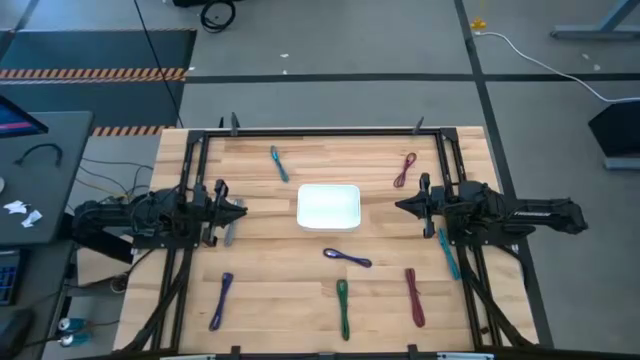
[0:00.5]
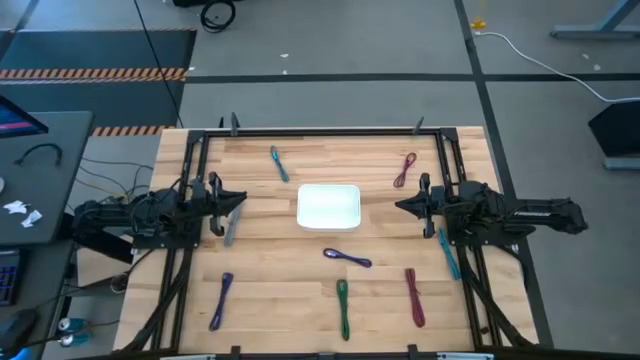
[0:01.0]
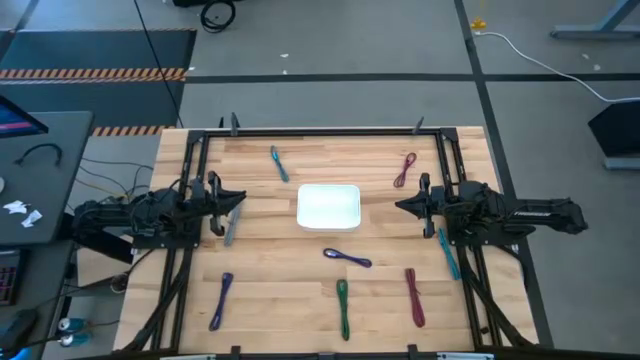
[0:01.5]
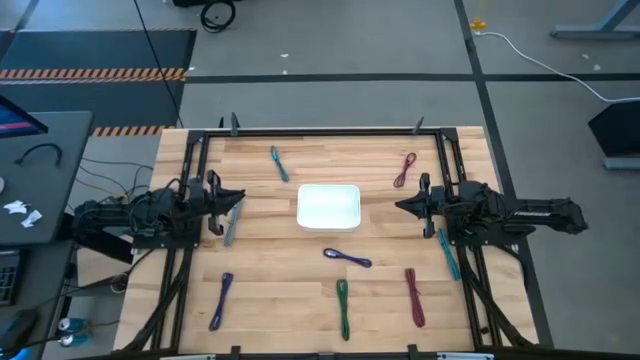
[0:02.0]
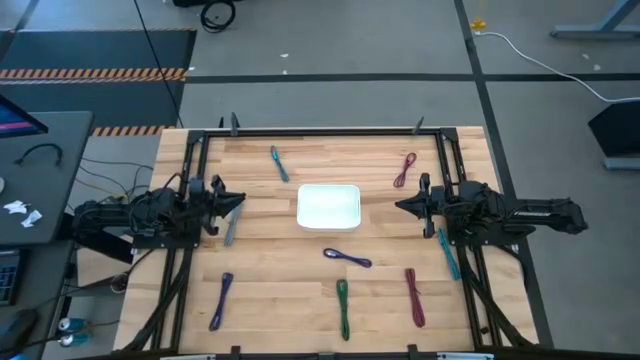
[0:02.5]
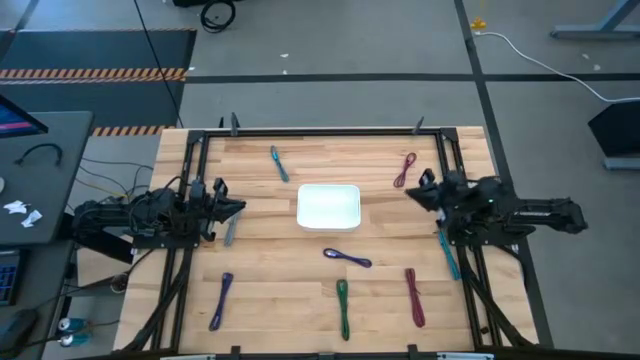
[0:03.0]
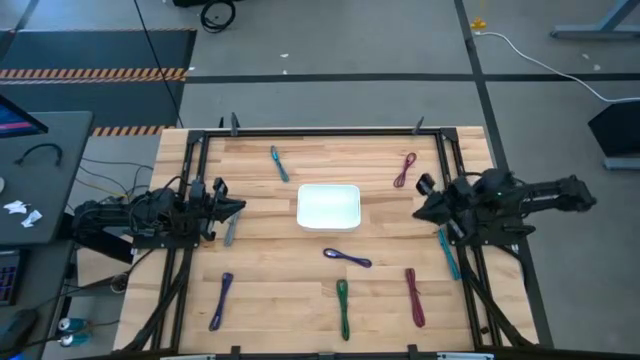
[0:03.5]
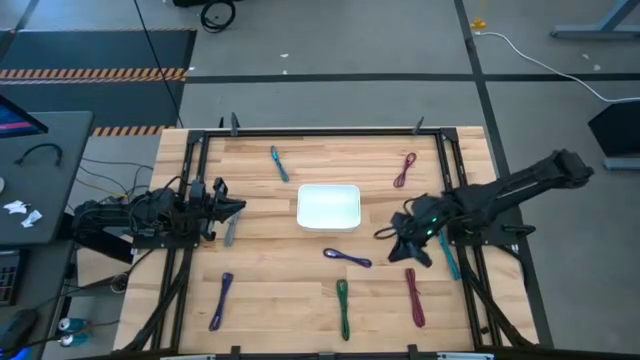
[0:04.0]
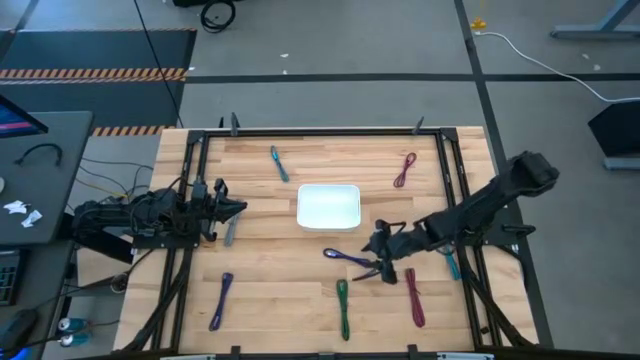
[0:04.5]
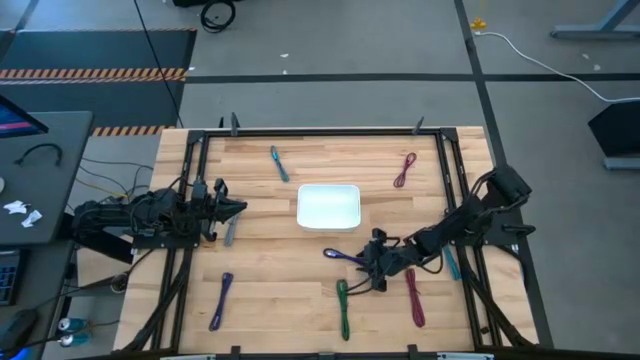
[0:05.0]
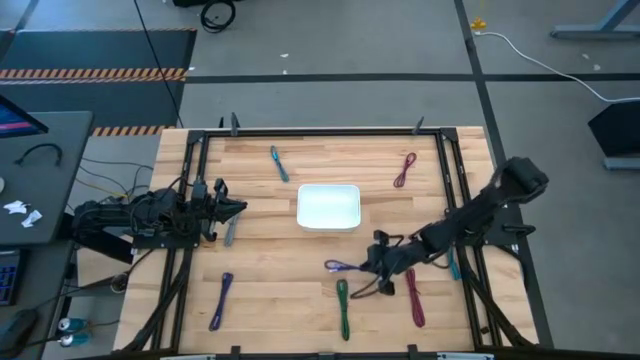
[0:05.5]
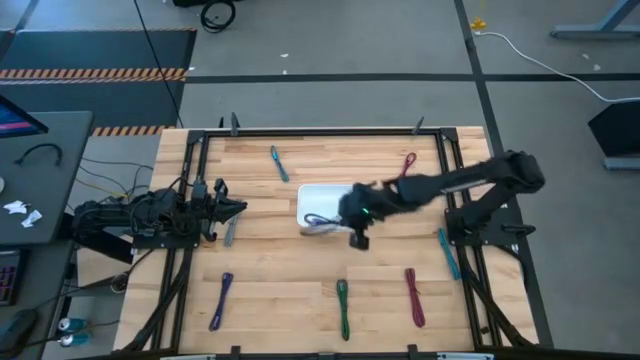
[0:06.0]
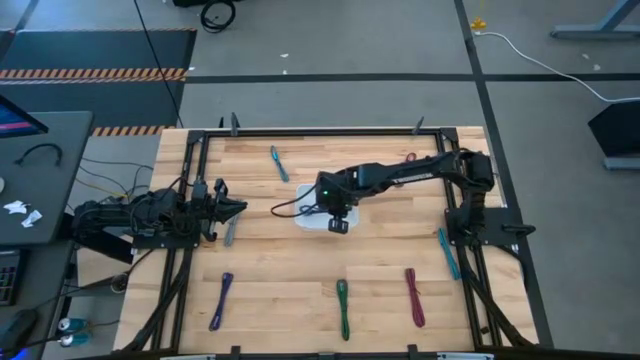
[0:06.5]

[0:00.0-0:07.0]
Task: Pick and place USB-C Cables
Put the right black and violet charger cable into the white bin

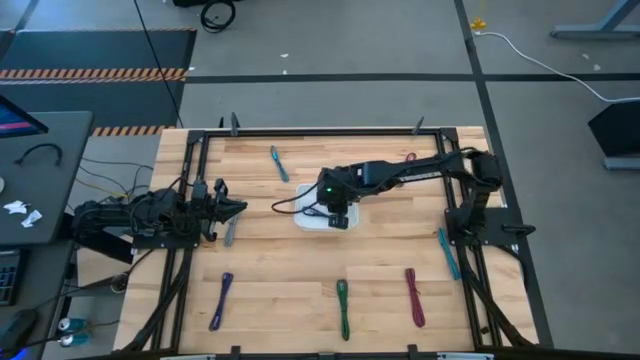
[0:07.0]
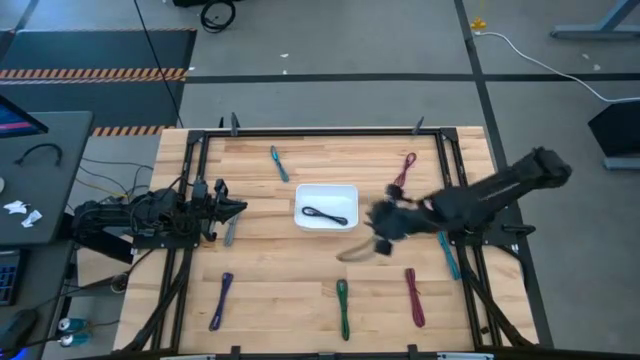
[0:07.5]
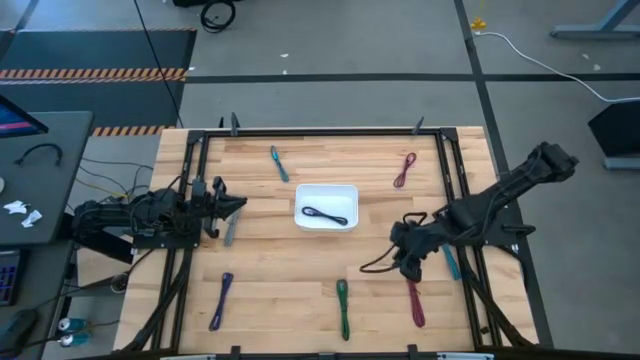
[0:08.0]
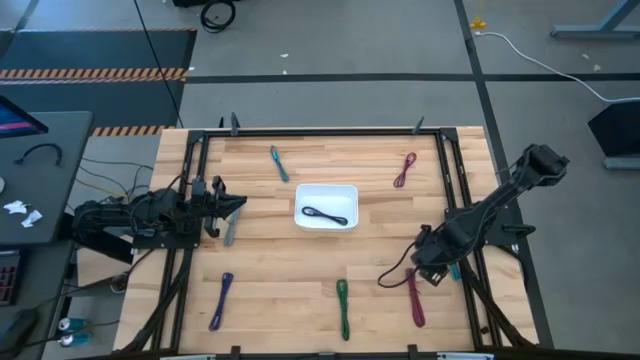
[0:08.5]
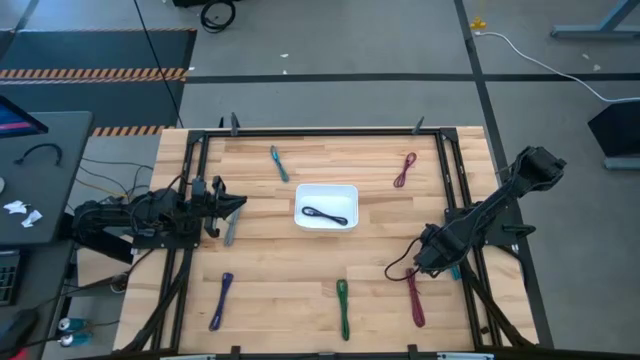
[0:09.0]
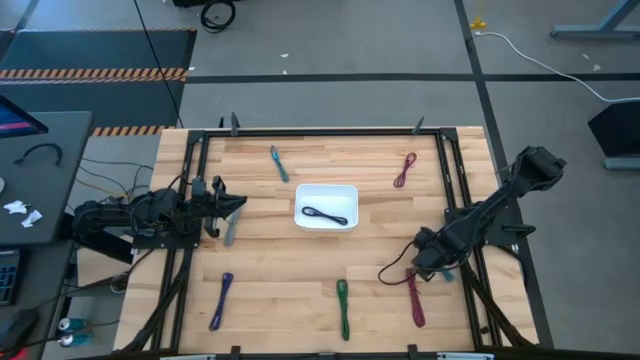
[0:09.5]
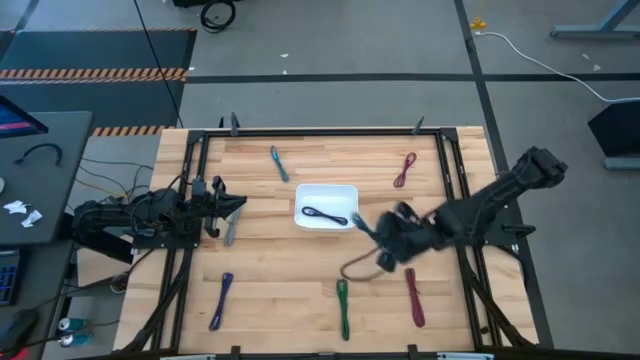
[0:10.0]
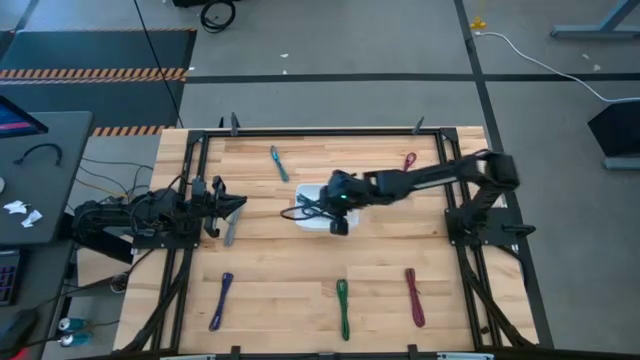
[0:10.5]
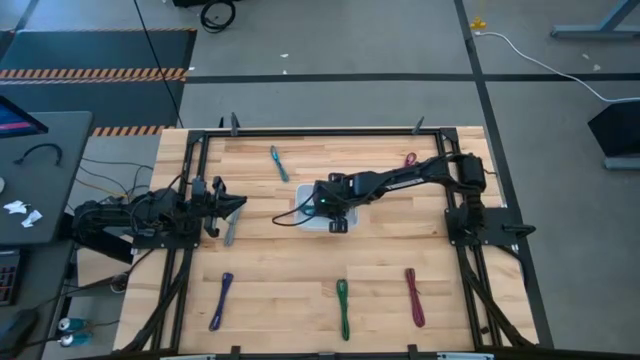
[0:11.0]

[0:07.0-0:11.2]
Put the bottom black and blue charger cable into the white bin

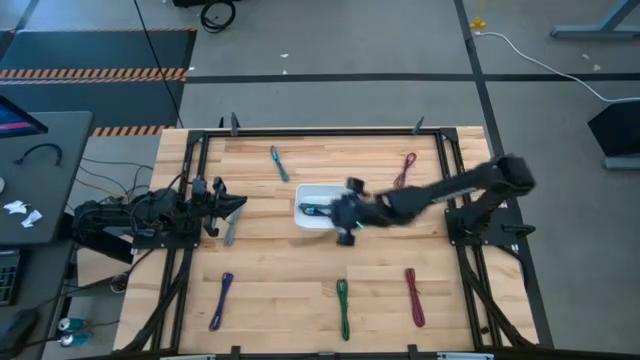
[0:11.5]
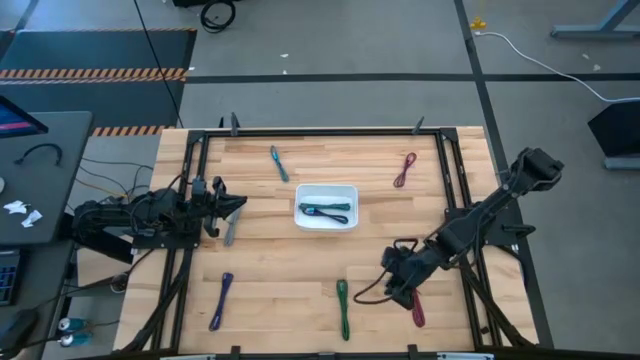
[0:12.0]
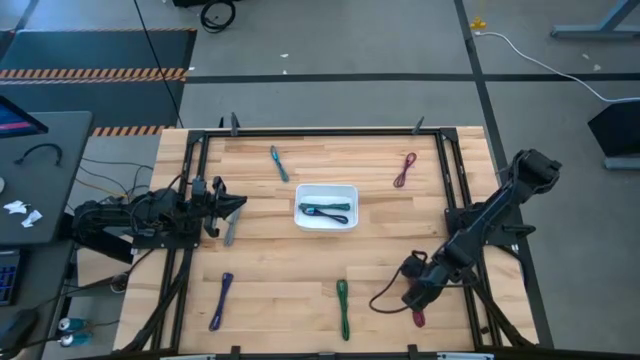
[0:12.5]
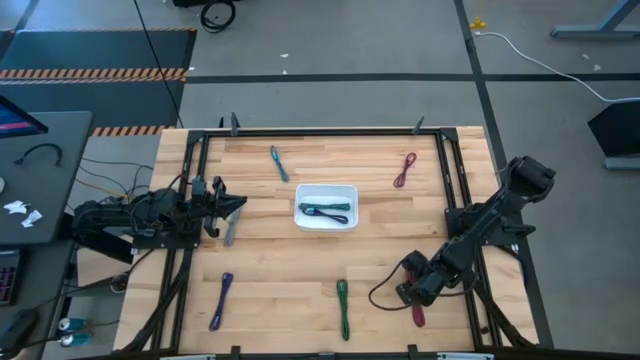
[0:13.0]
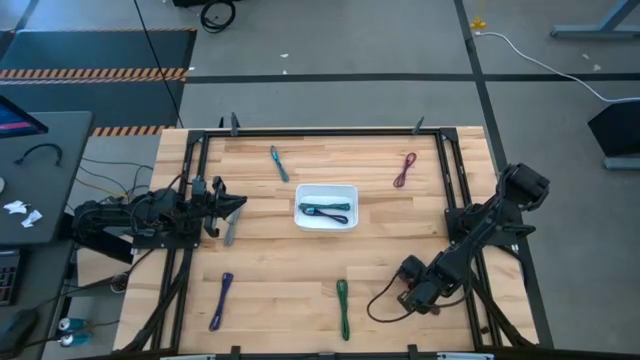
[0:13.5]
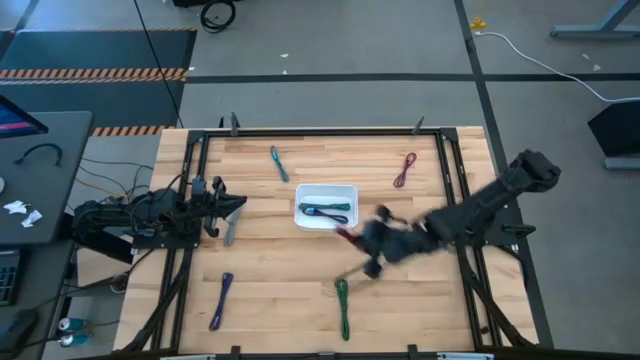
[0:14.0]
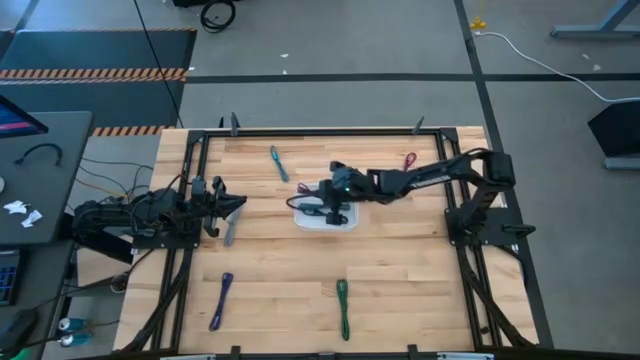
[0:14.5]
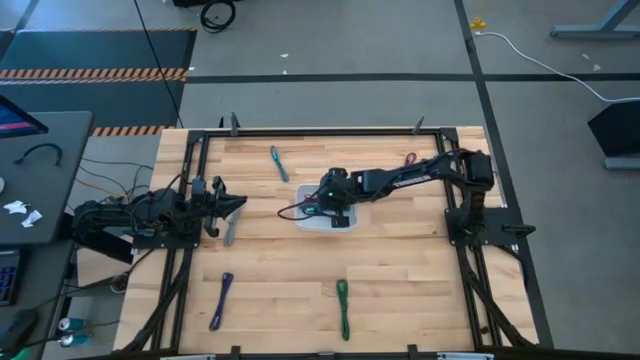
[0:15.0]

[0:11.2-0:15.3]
Put the bottom black and pink charger cable into the white bin

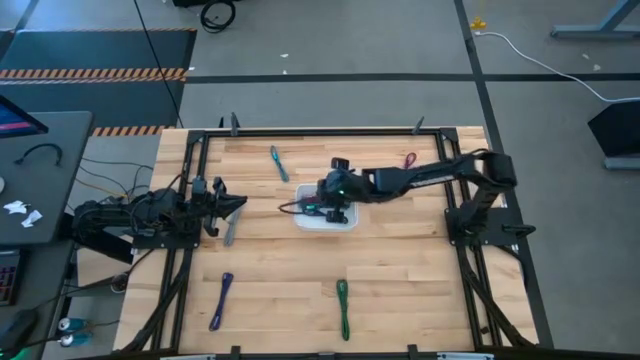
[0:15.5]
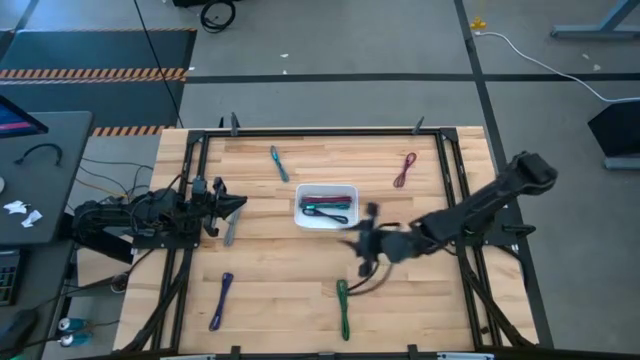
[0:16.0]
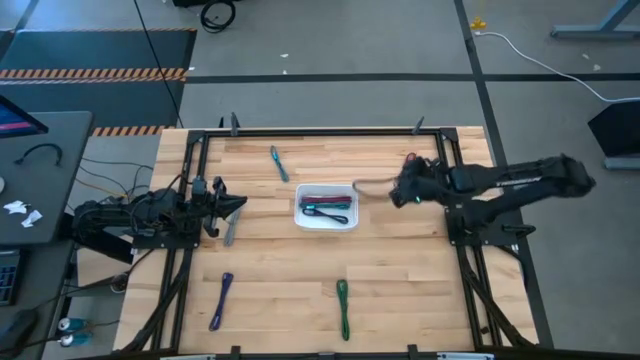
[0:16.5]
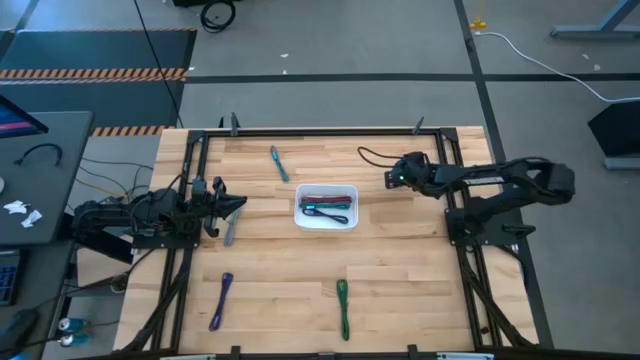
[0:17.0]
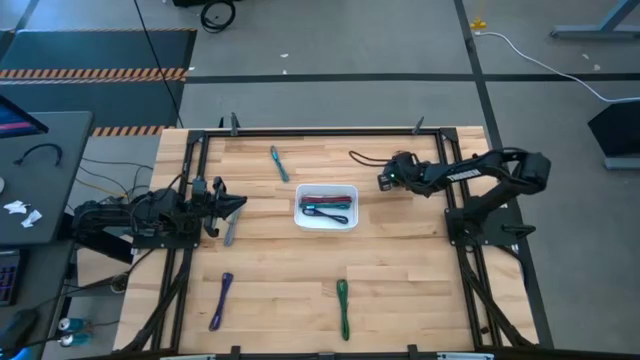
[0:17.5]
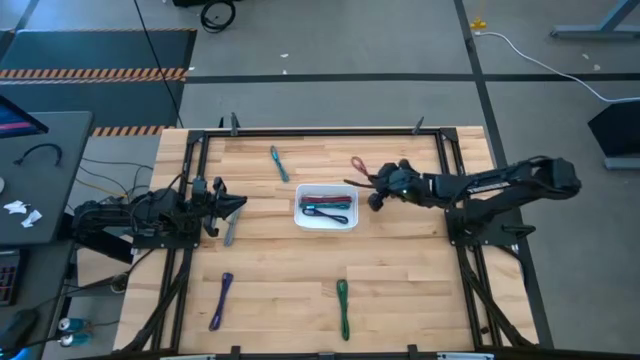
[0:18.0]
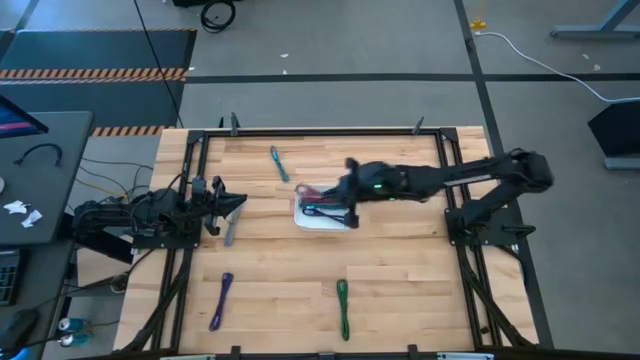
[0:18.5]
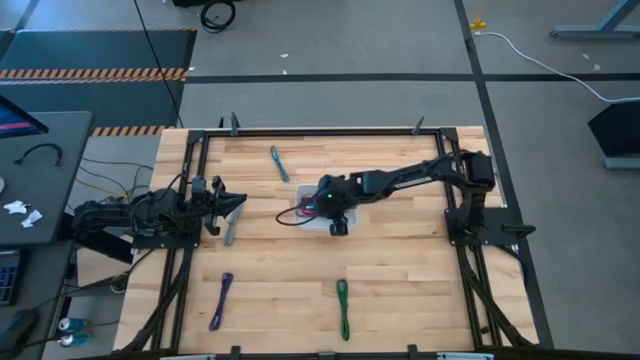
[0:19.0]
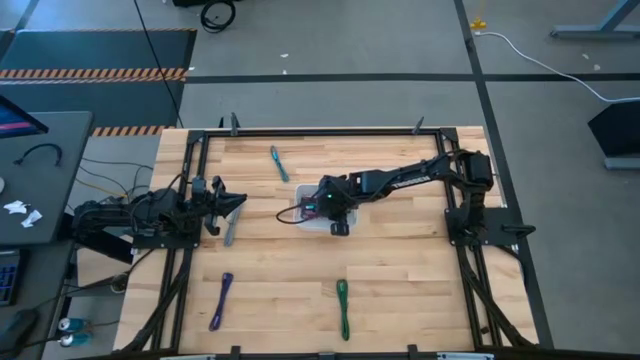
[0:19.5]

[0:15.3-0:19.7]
Put the black and pink charger cable into the white bin

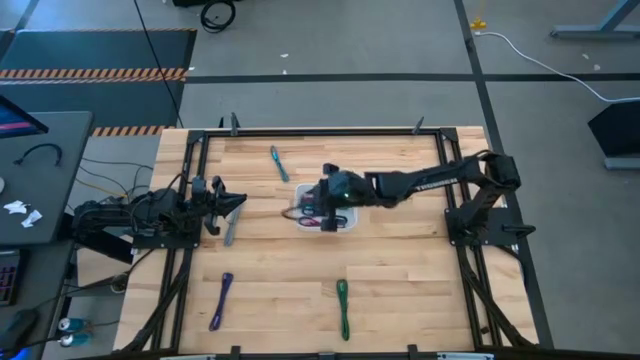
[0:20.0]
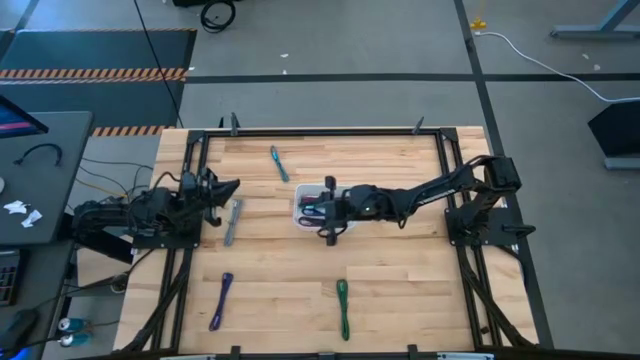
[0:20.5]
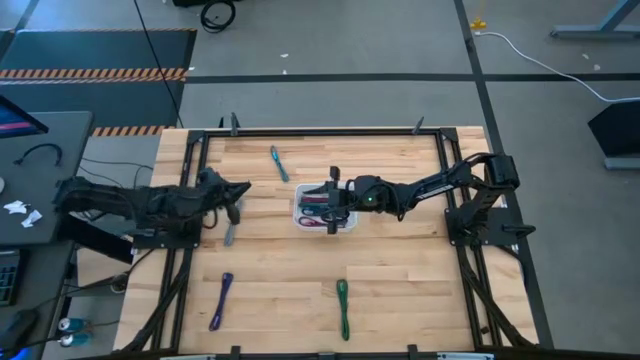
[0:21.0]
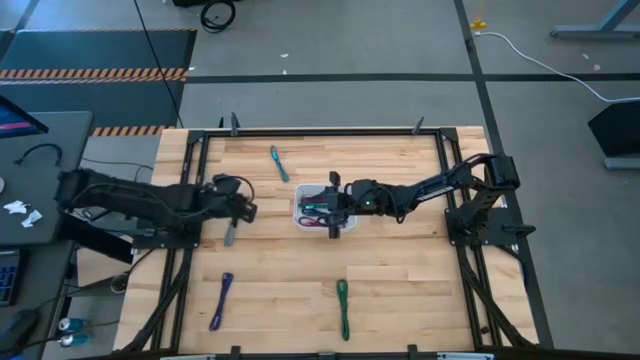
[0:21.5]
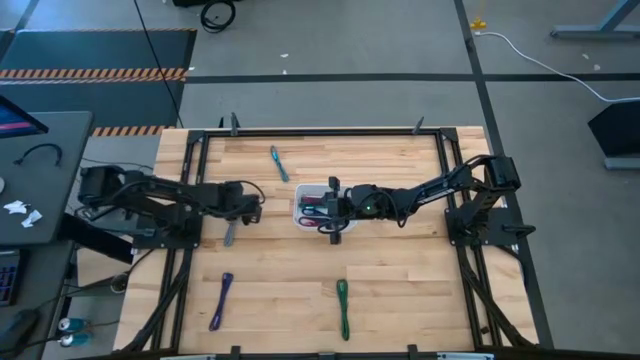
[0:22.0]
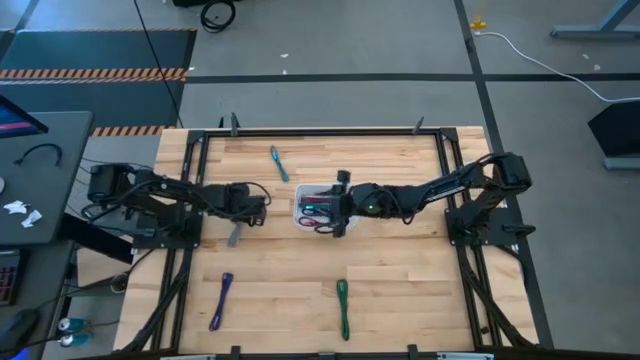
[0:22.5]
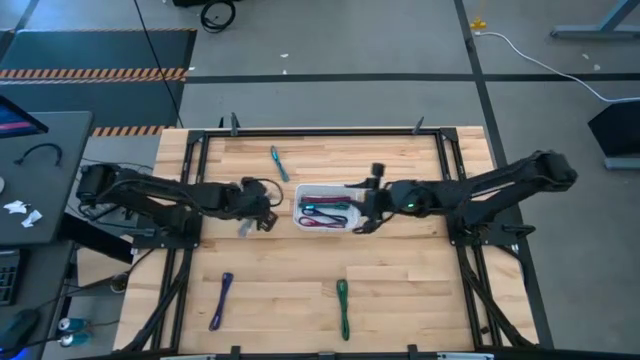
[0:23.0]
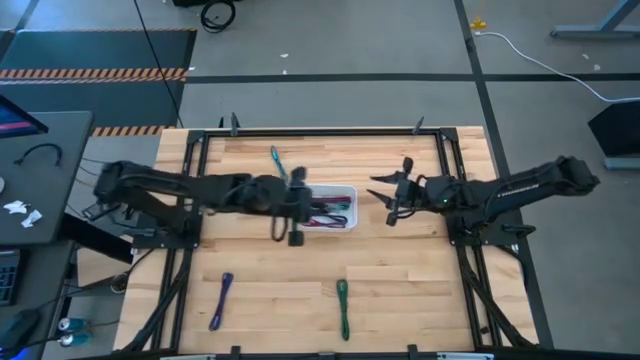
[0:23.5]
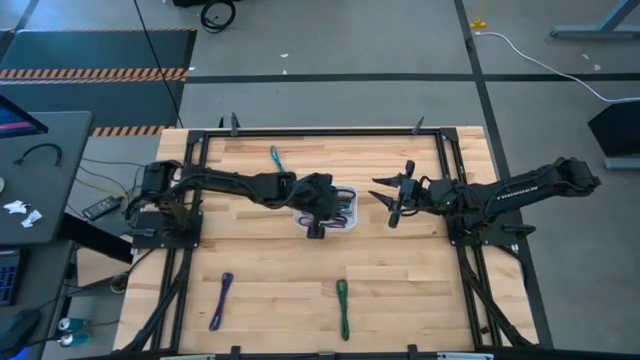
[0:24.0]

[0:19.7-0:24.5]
Put the black and white charger cable into the white bin
